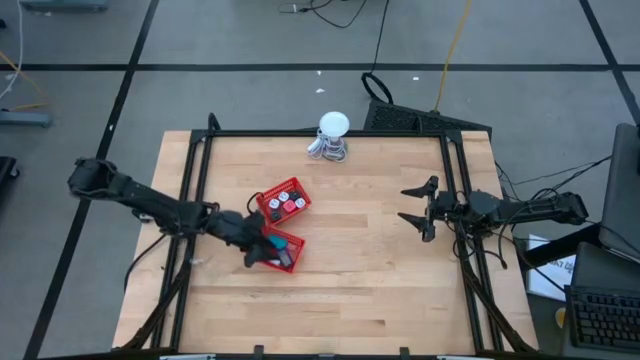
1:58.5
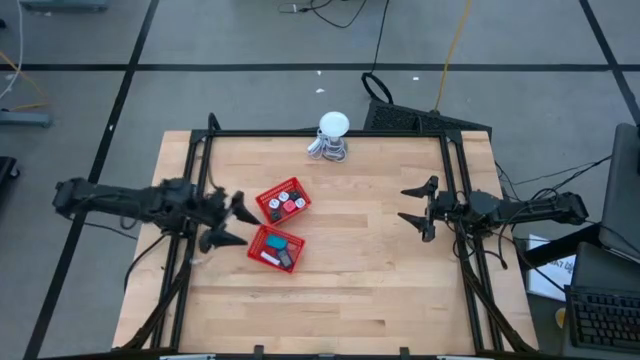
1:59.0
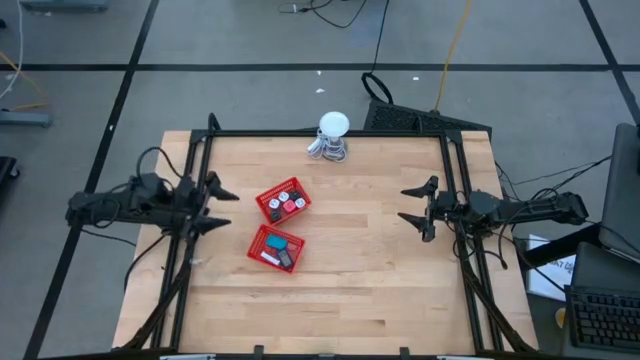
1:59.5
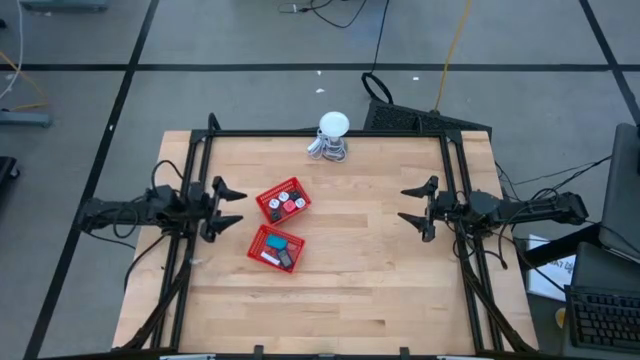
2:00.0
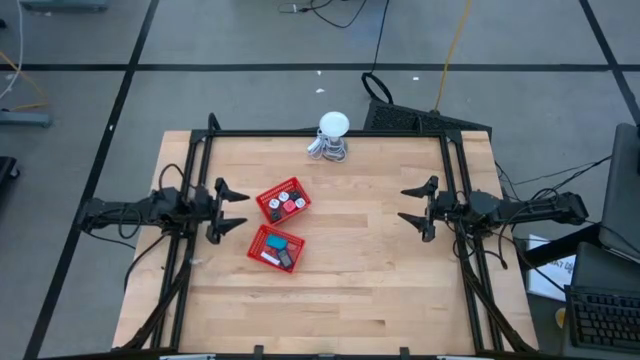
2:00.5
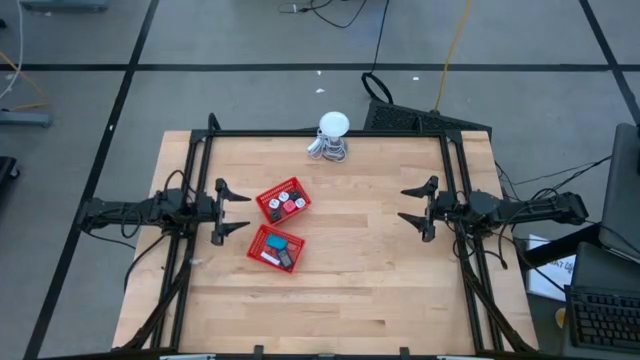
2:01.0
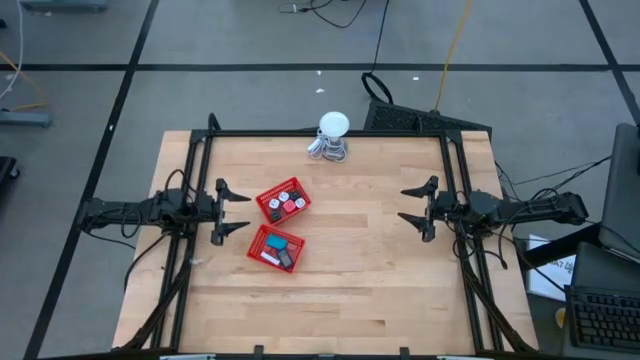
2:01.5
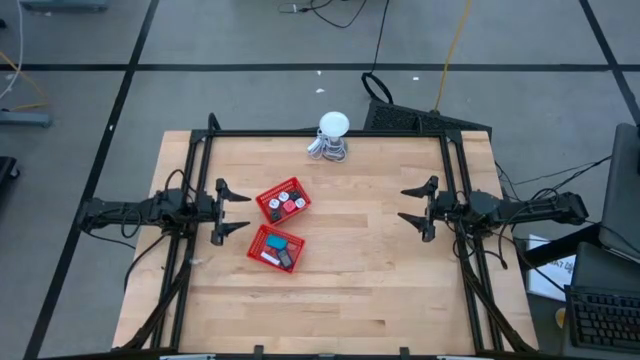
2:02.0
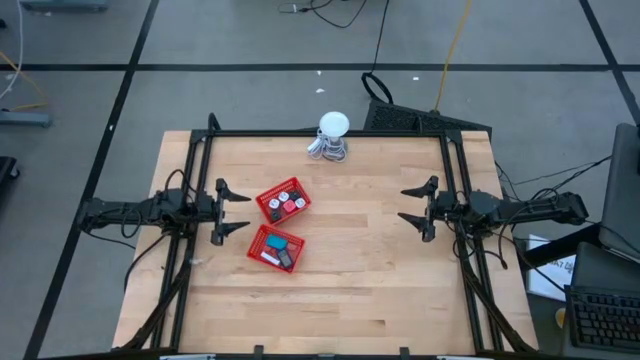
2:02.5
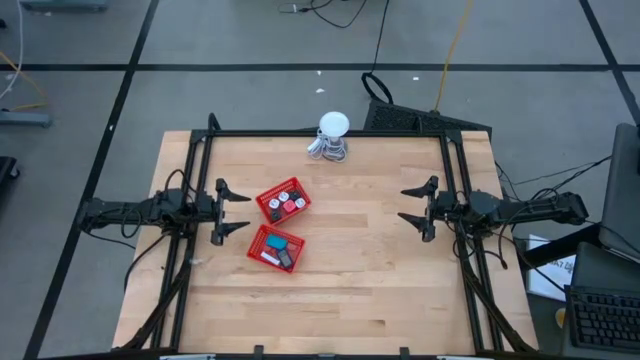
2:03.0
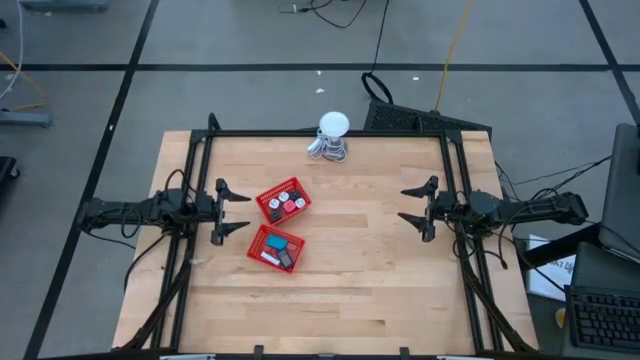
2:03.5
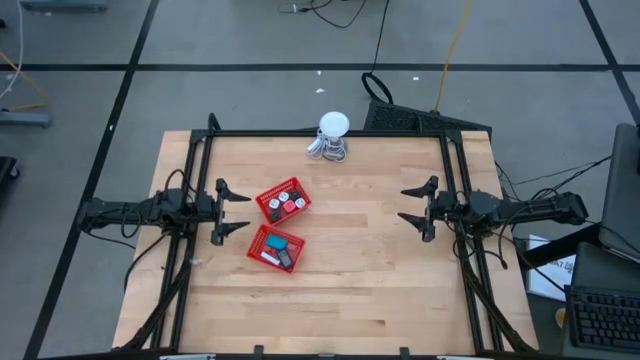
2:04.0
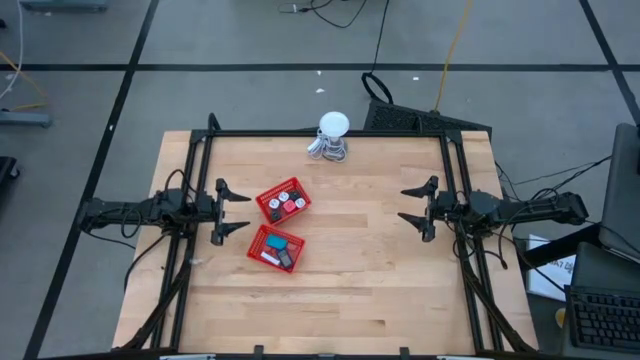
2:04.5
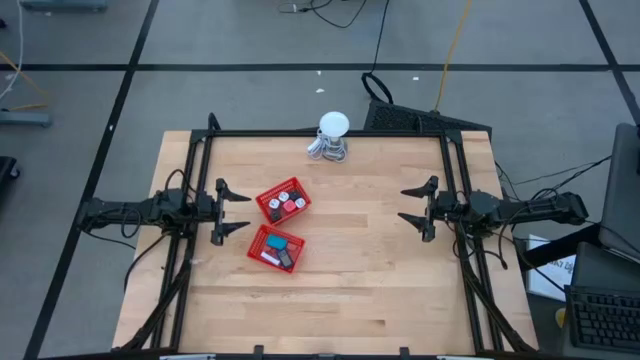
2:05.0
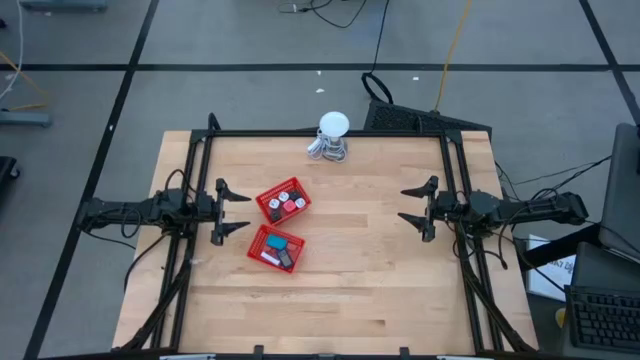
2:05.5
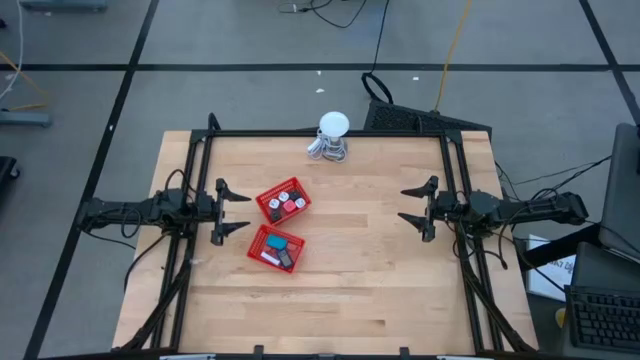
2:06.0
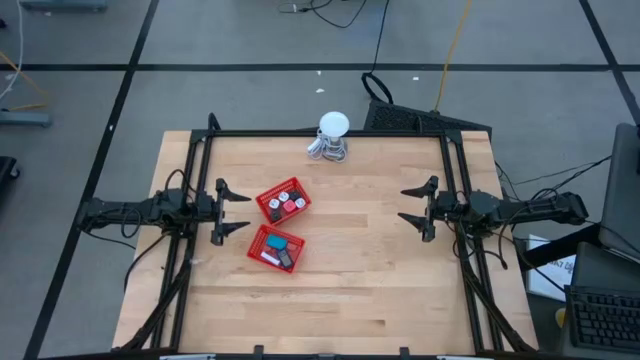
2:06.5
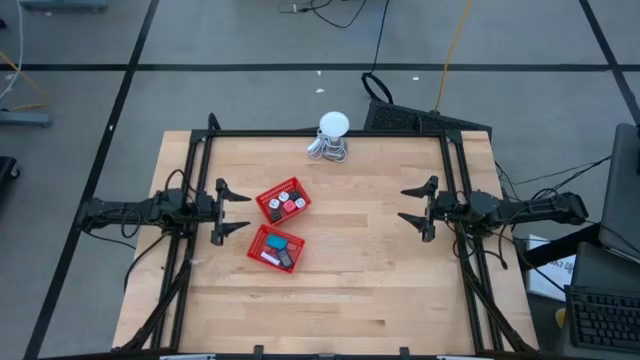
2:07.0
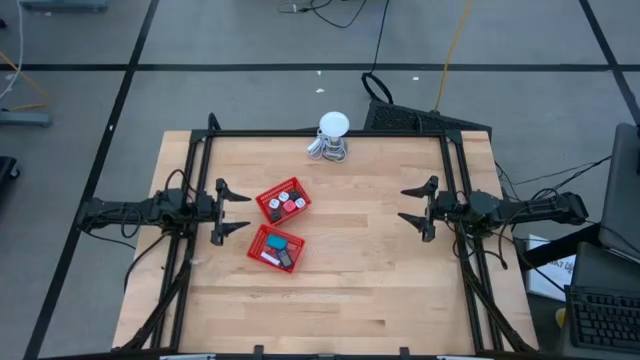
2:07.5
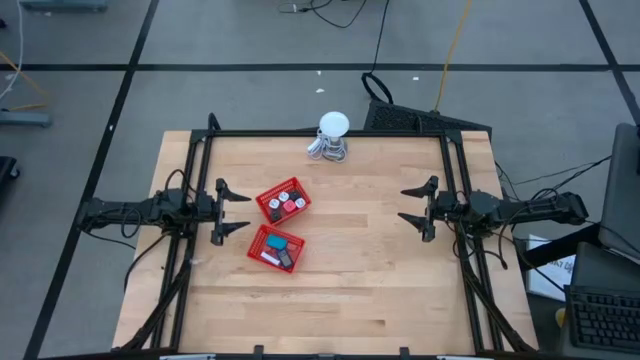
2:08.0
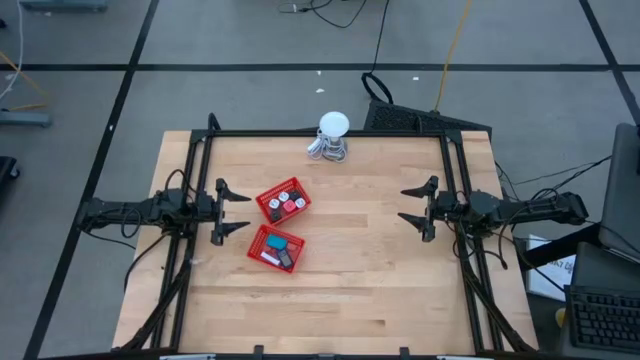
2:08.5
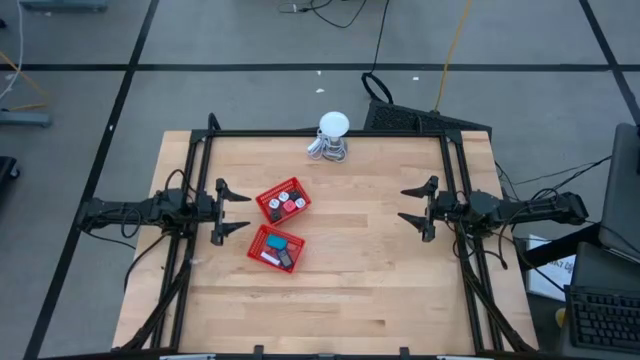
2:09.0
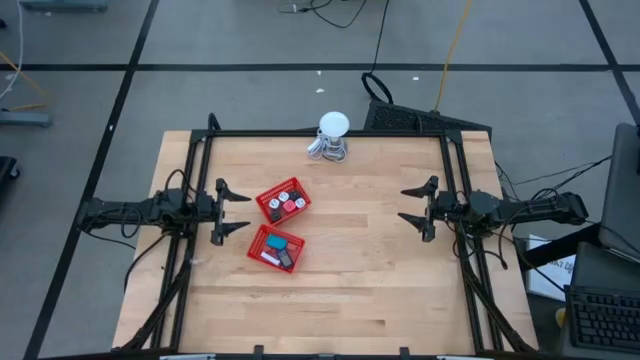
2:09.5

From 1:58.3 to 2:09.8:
Task: Pick & Place Office items
Return to Home Position

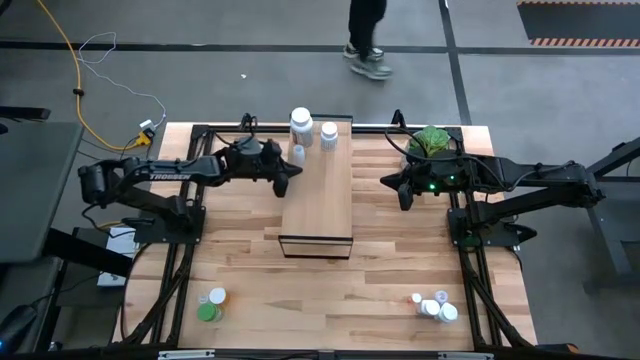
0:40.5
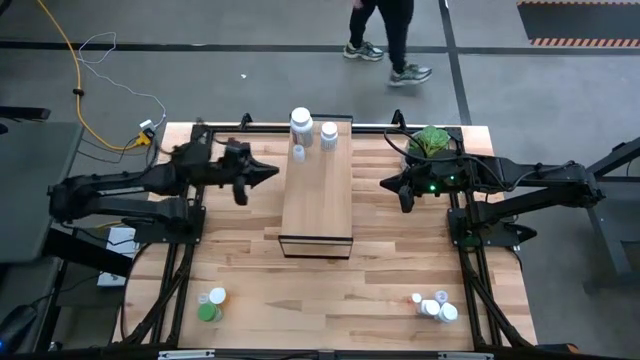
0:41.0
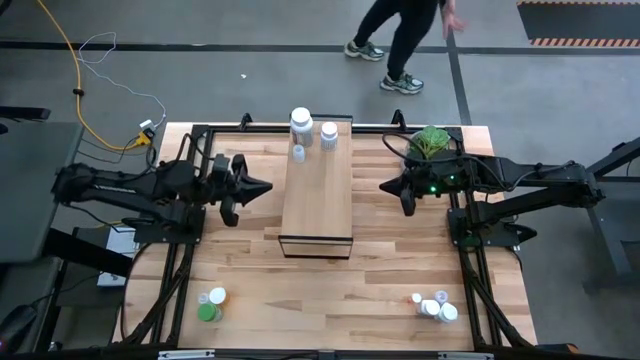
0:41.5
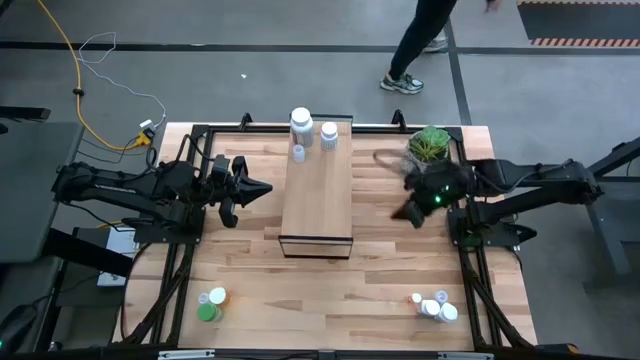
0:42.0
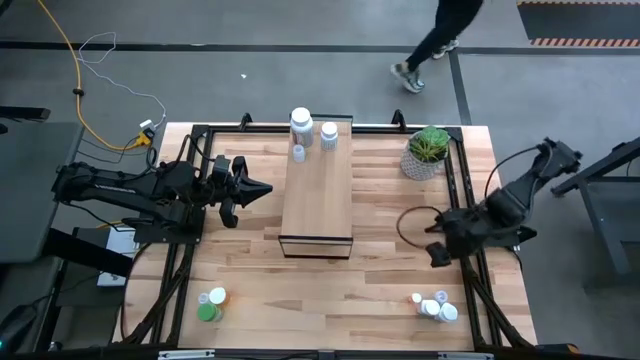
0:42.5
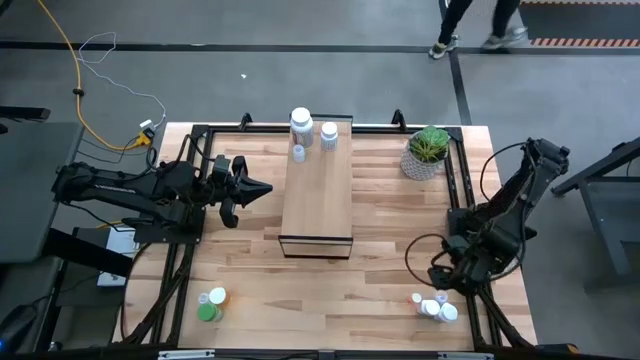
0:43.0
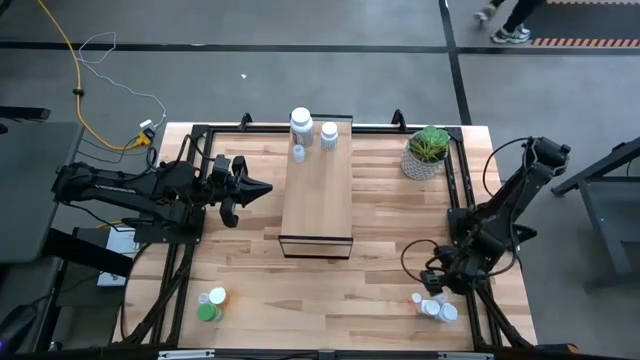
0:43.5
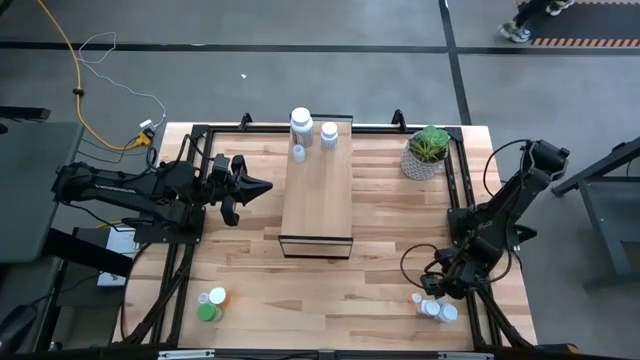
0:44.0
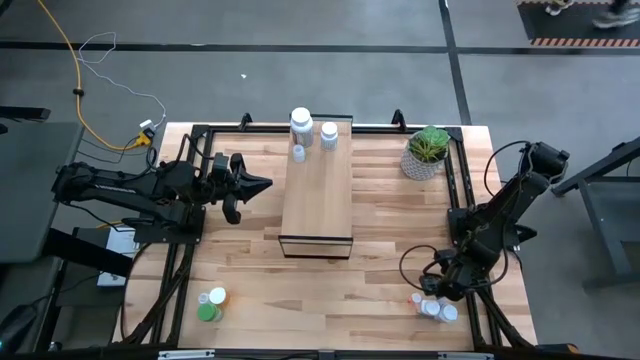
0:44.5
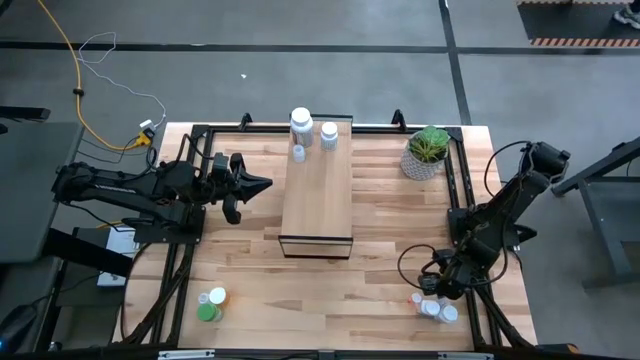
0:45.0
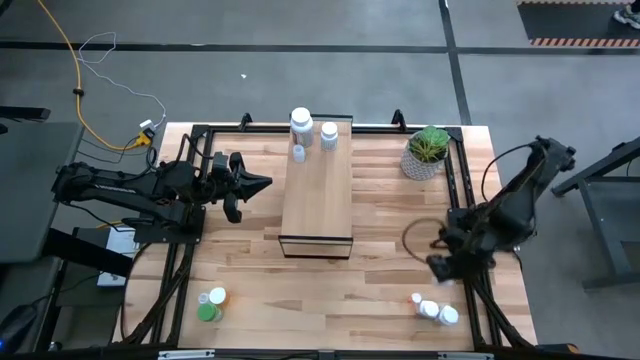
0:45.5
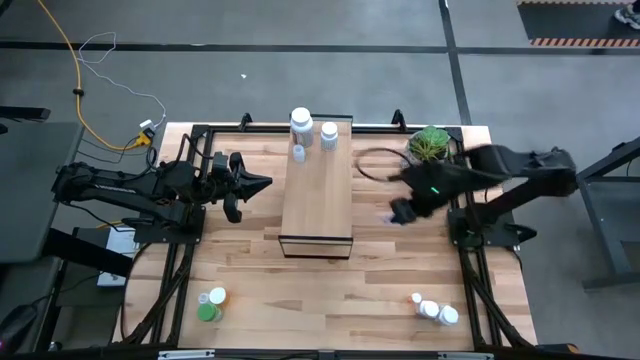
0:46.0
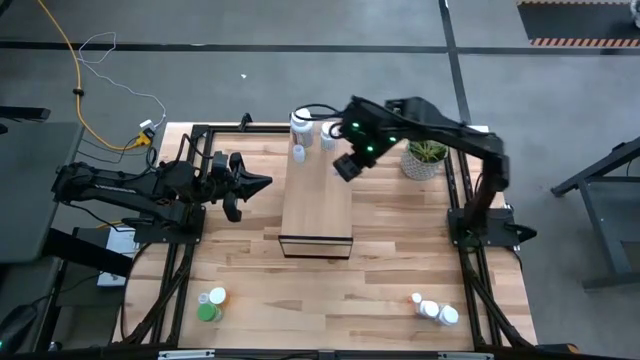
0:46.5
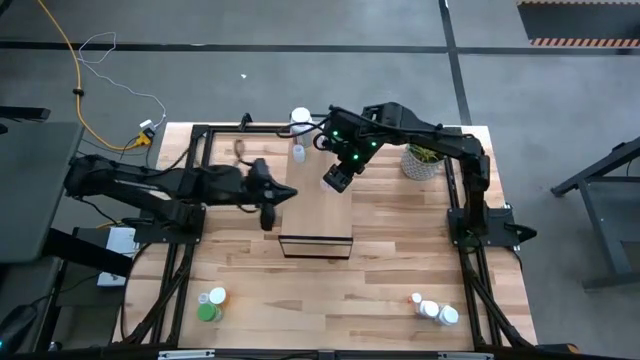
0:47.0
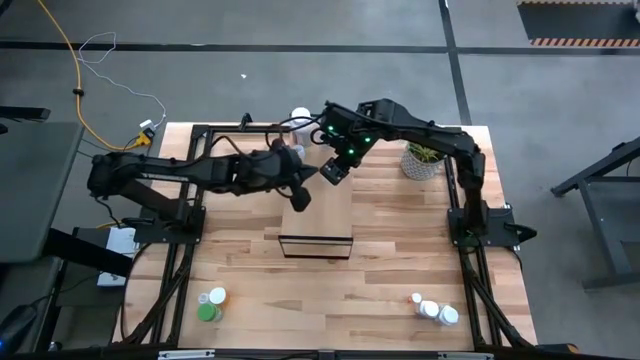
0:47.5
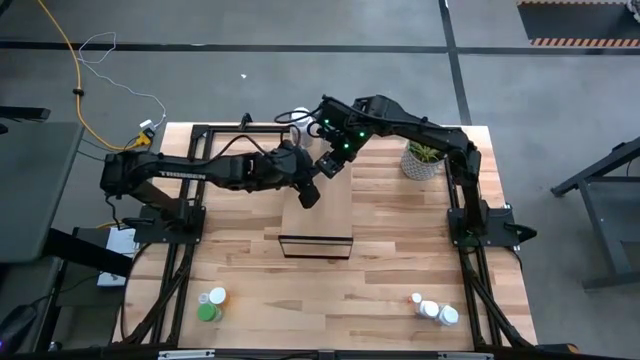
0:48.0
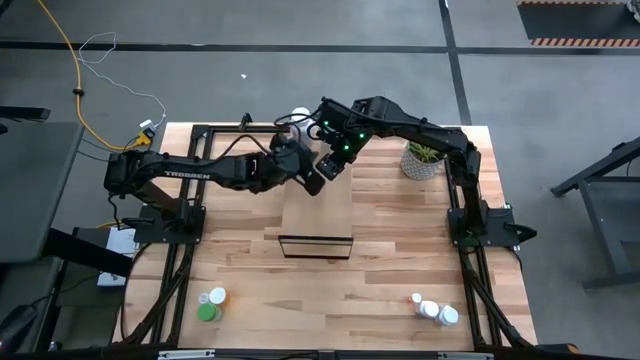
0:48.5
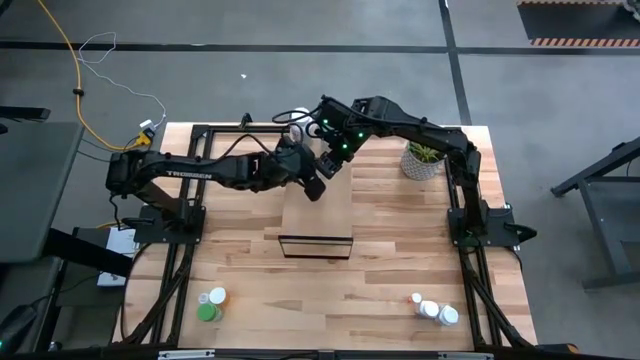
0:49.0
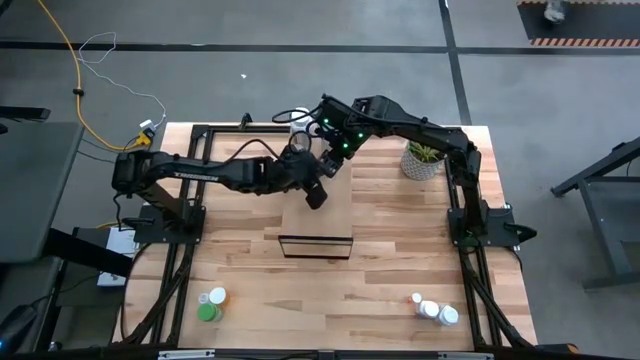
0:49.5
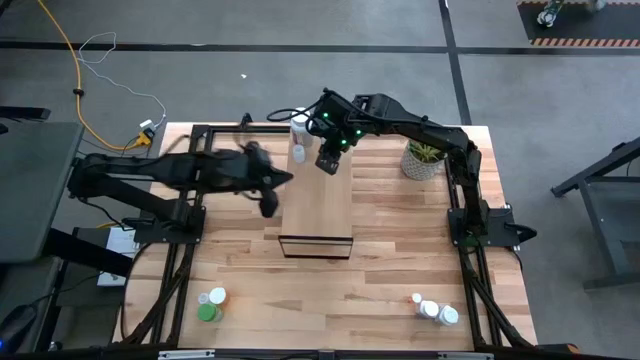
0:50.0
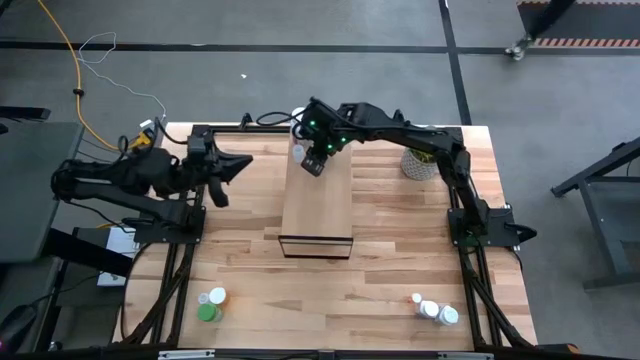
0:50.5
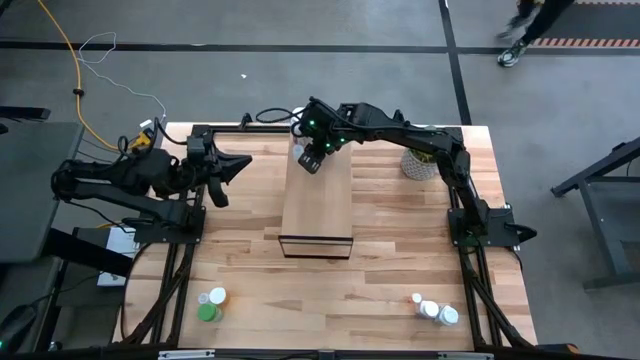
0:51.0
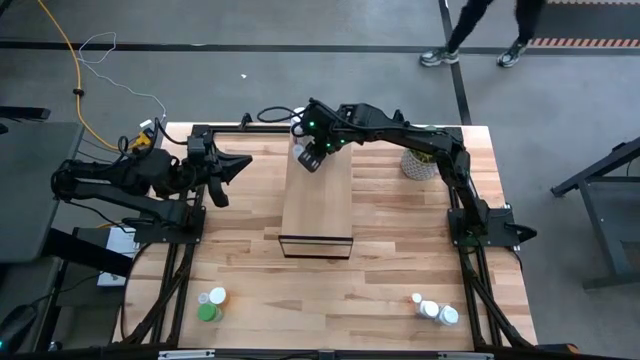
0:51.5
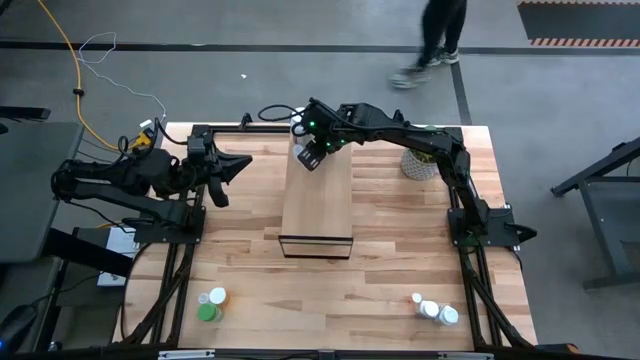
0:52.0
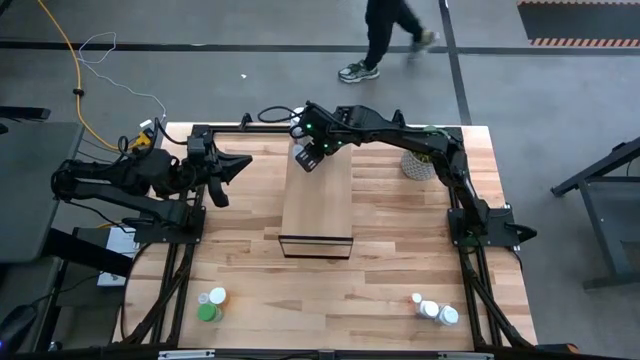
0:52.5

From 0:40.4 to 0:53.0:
Task: Pick and place medicine bottles onto shelf by color
Put the transparent medicine bottle on the shelf
